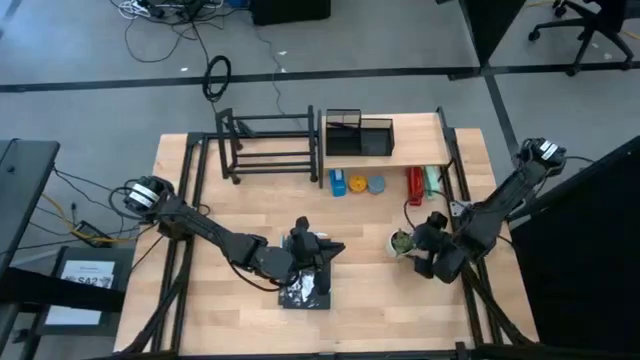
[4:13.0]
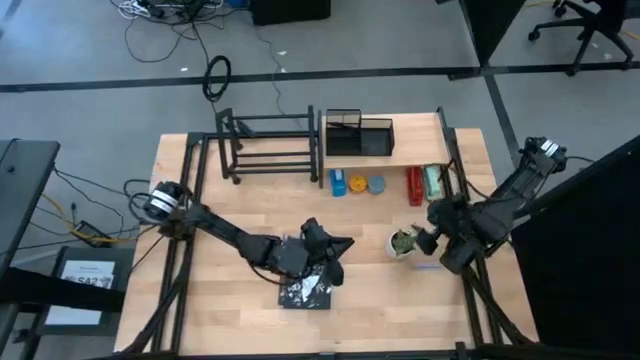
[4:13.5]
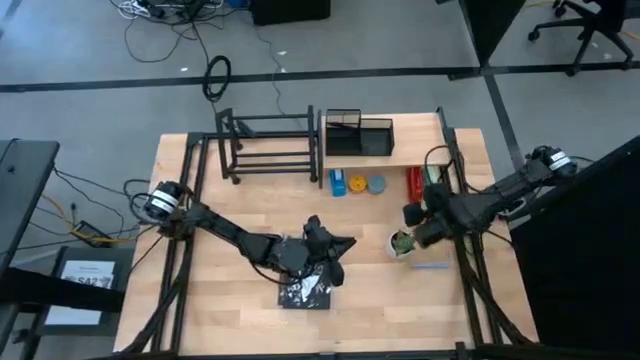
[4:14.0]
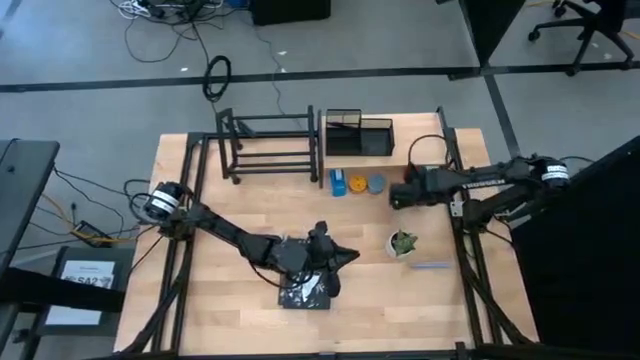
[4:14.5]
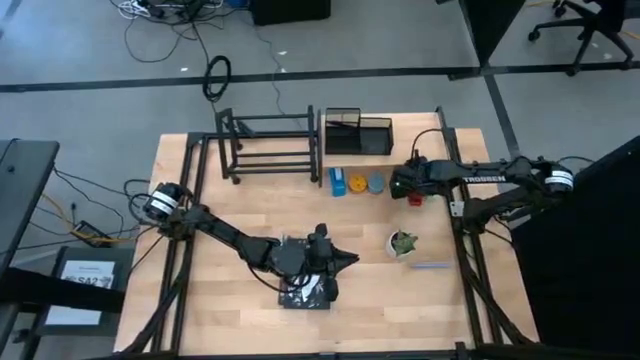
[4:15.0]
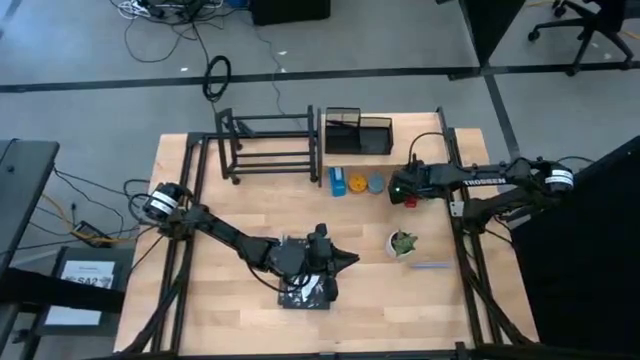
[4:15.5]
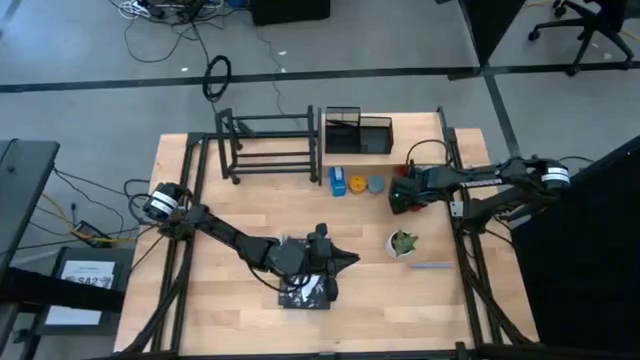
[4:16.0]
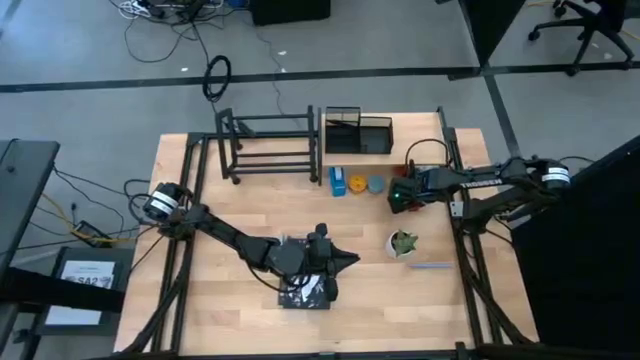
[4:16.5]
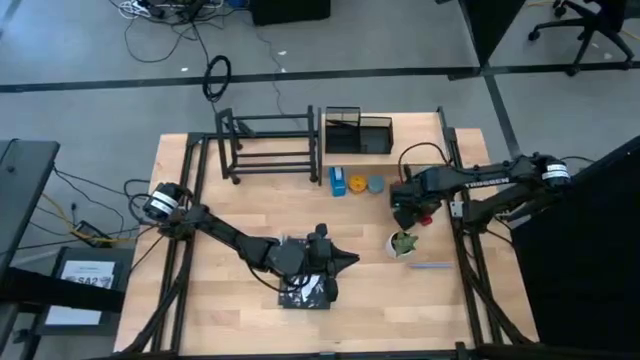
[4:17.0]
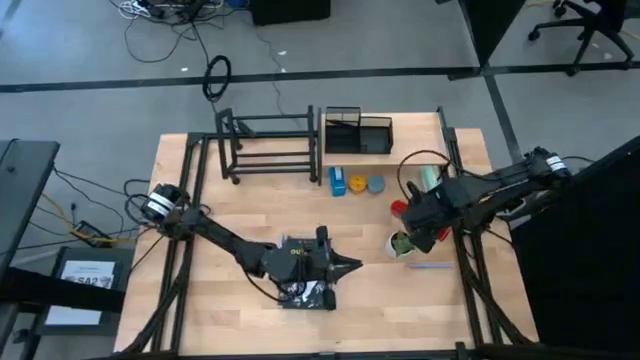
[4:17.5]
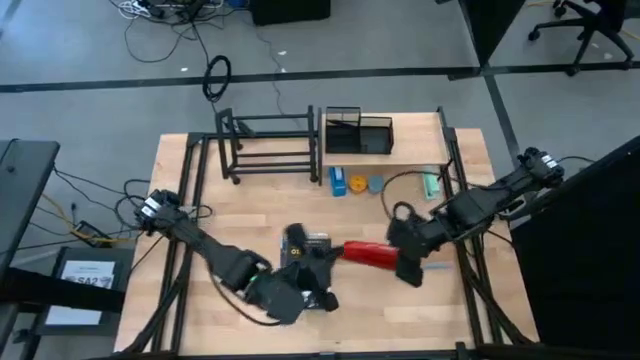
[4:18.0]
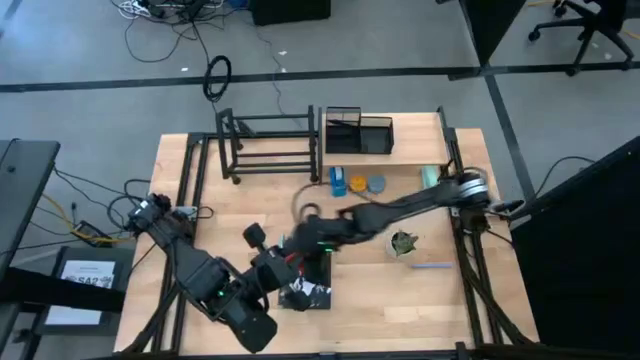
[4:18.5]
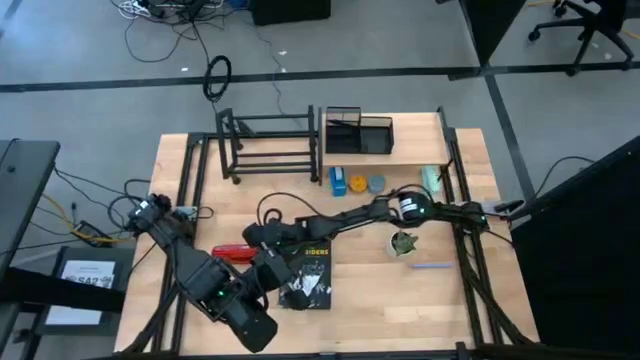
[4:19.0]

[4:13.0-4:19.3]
Task: Stock shelves
Remove red stapler from under the shelf

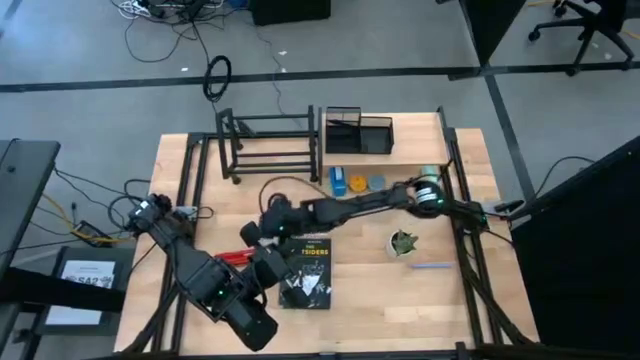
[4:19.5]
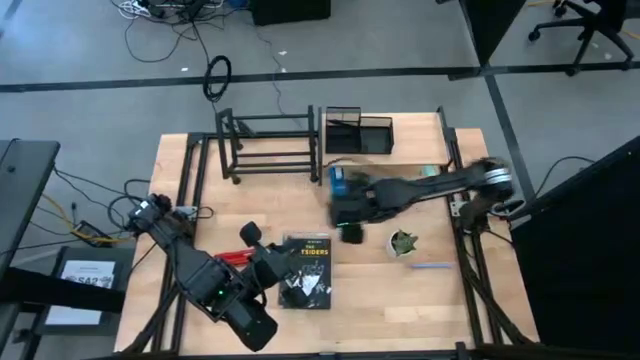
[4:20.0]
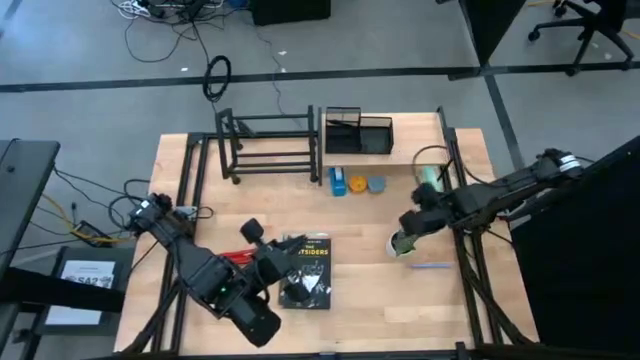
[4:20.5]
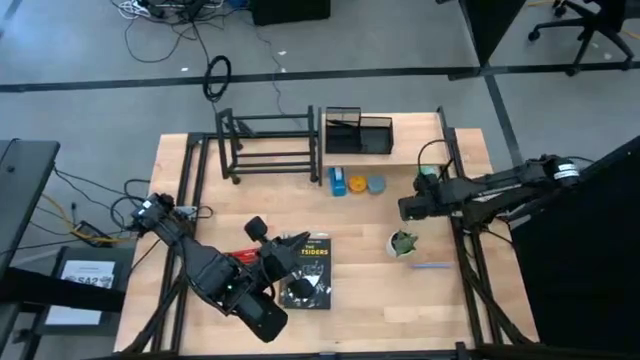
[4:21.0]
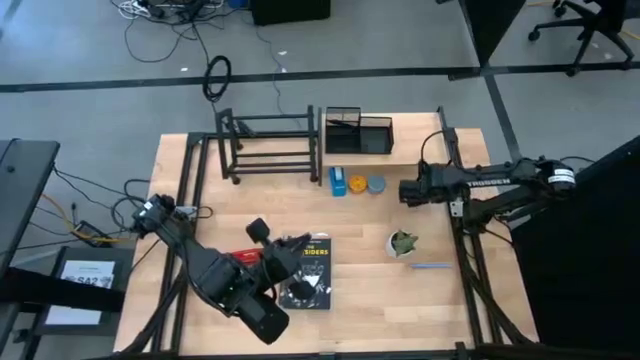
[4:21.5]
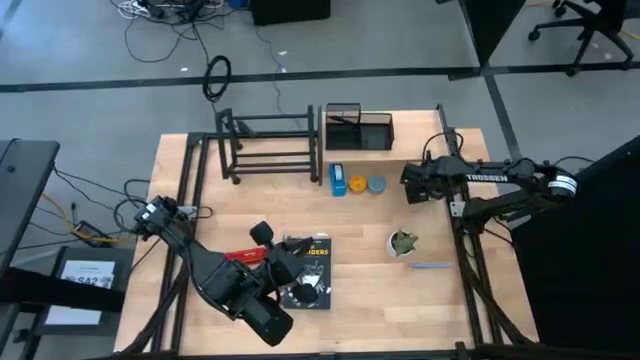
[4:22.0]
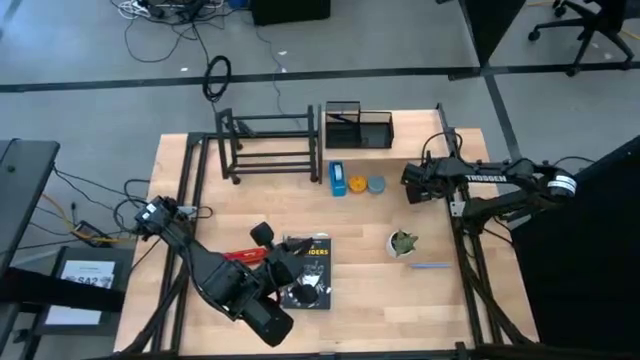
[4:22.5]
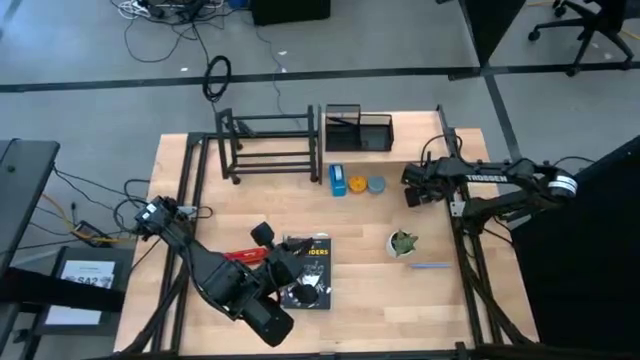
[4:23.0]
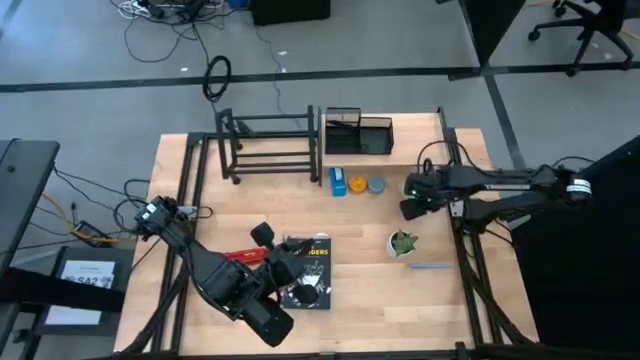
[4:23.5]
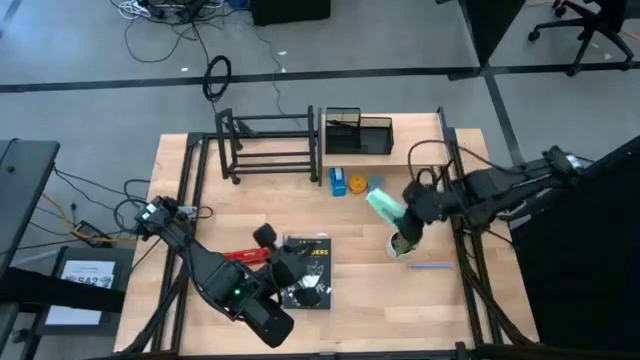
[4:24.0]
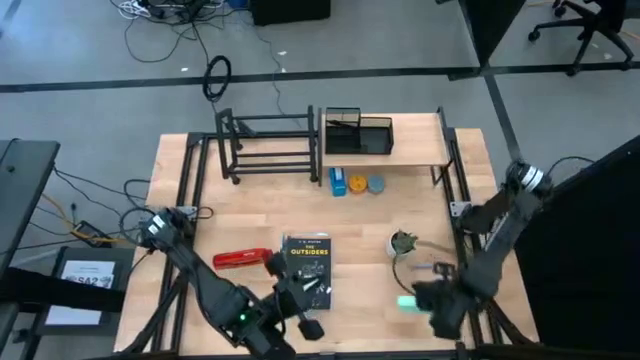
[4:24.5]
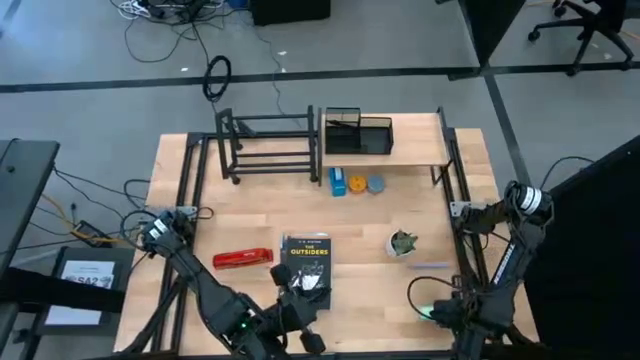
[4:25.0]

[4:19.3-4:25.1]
Remove green stapler from under the shelf

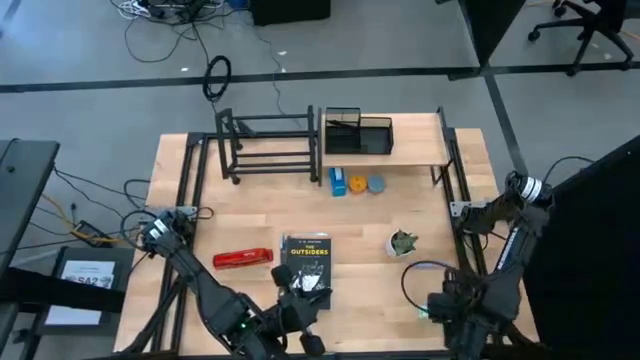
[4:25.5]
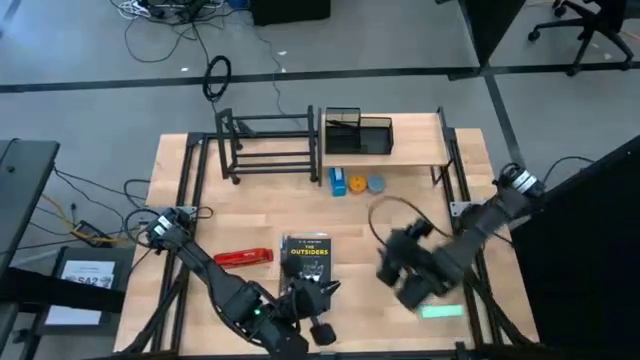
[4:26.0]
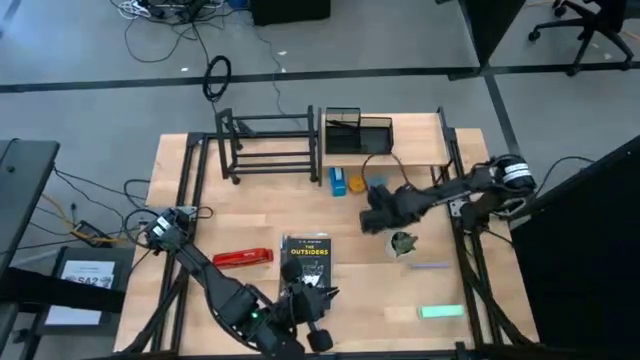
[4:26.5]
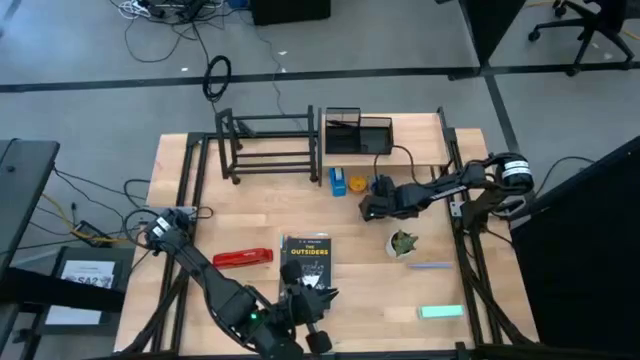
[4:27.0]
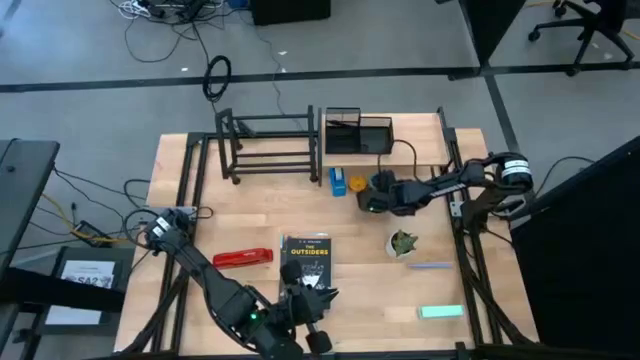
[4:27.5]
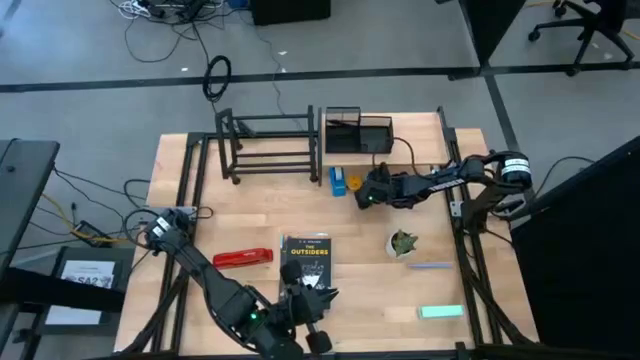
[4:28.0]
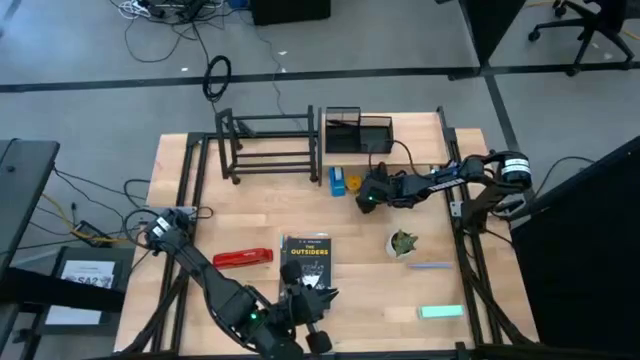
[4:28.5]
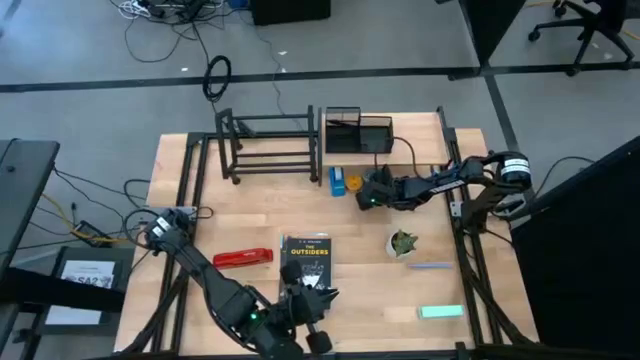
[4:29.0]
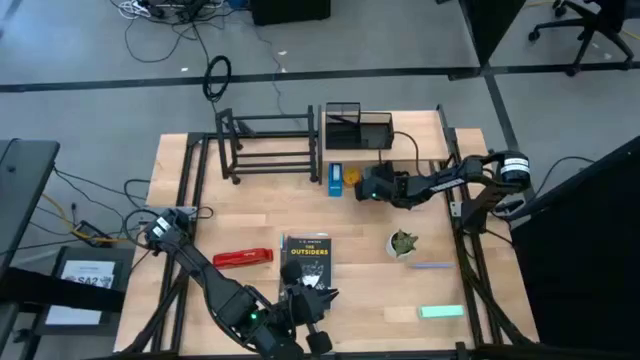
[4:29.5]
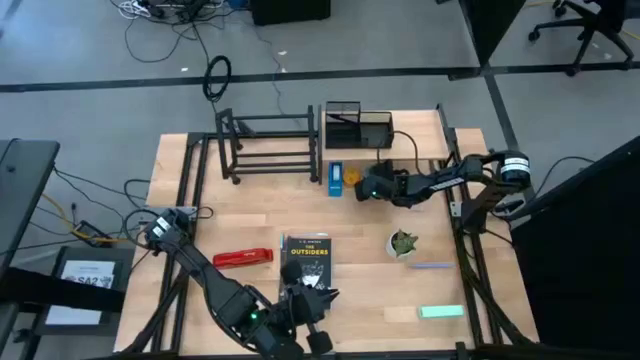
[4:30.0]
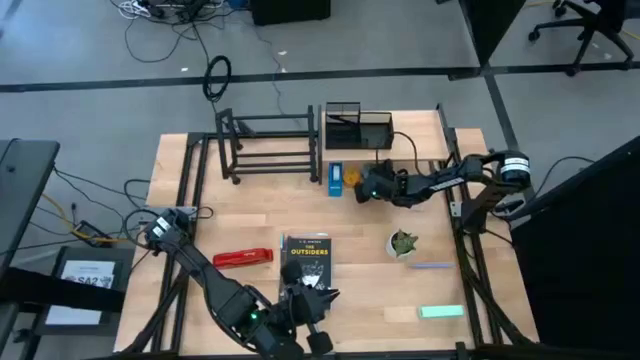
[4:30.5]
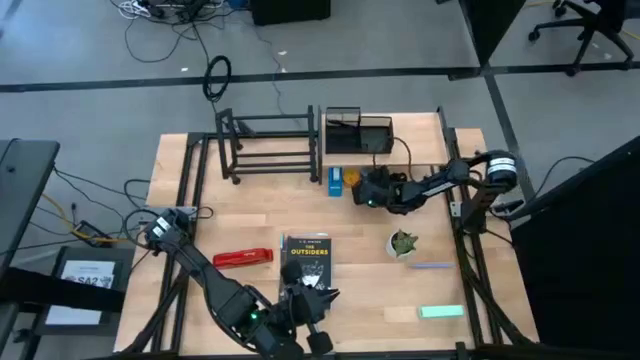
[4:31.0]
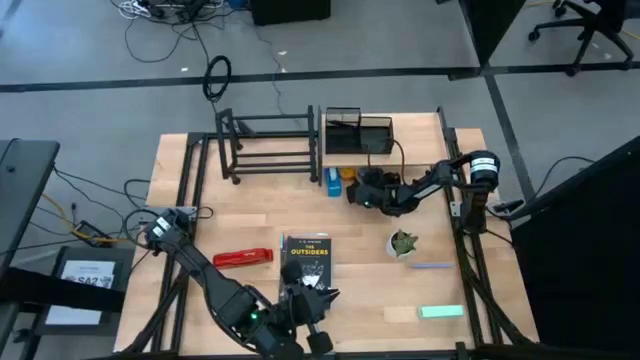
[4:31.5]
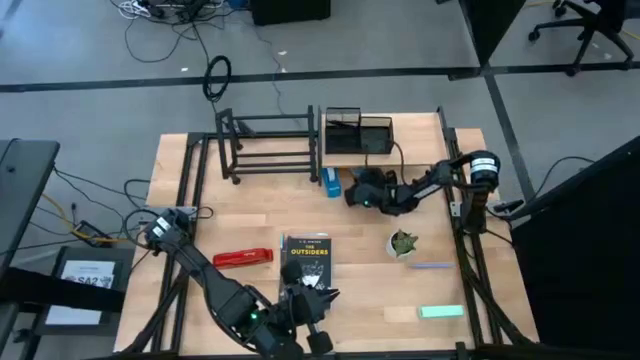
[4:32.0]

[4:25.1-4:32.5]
Remove the blue scented candle from under the shelf

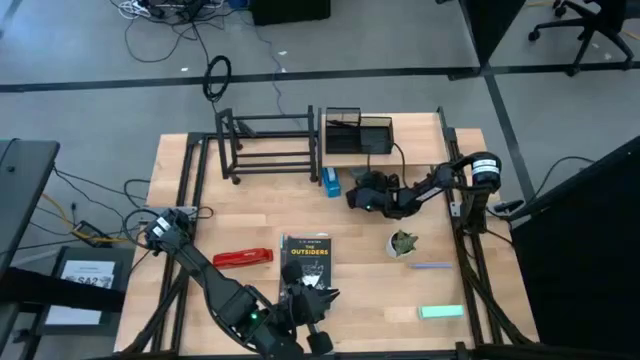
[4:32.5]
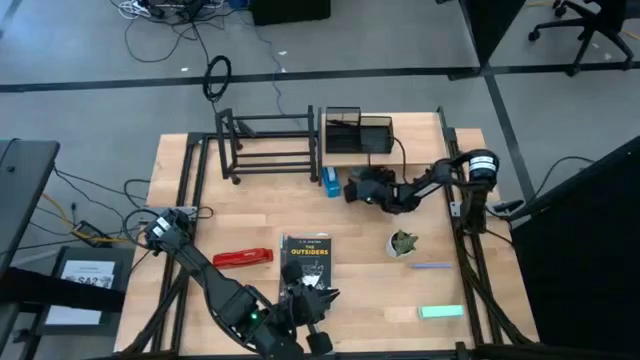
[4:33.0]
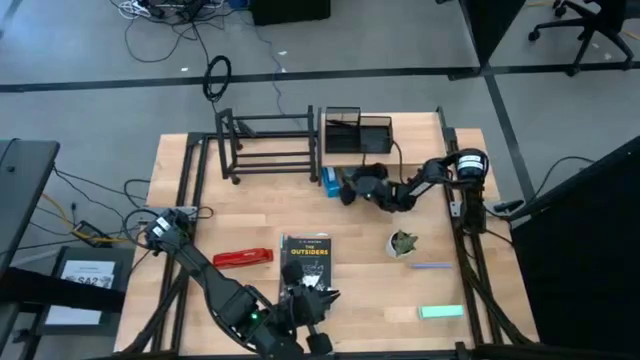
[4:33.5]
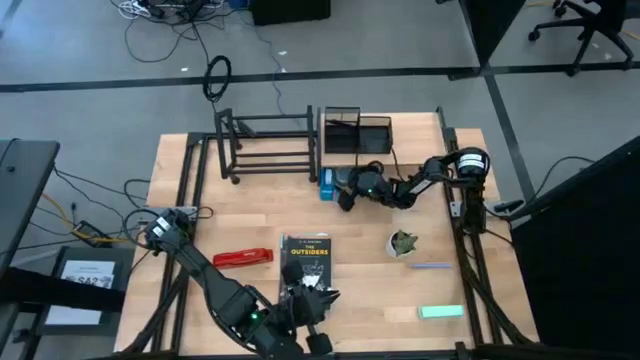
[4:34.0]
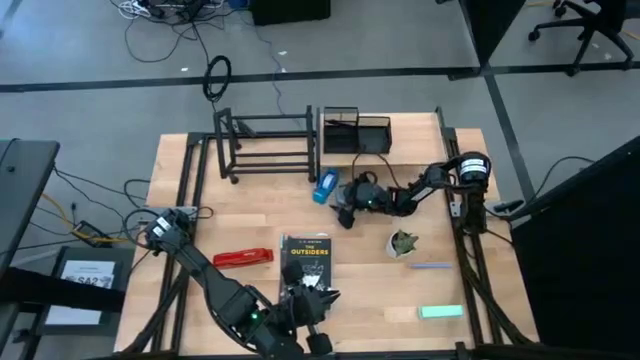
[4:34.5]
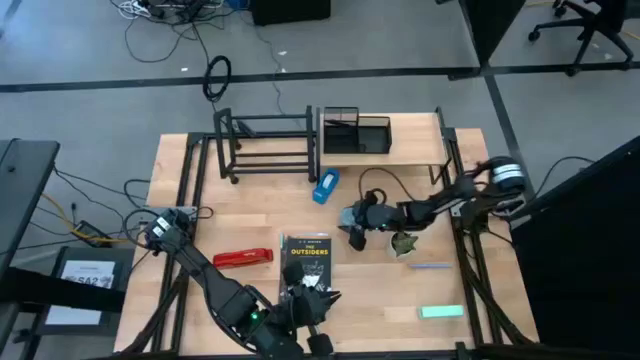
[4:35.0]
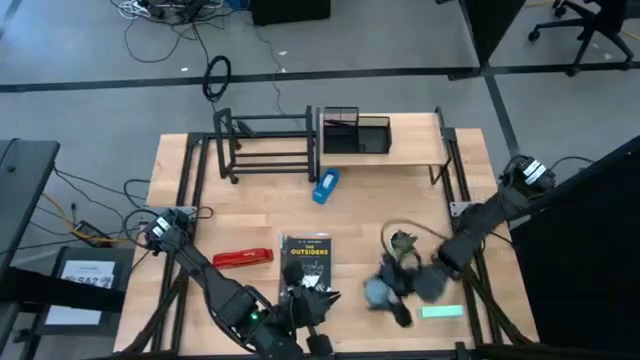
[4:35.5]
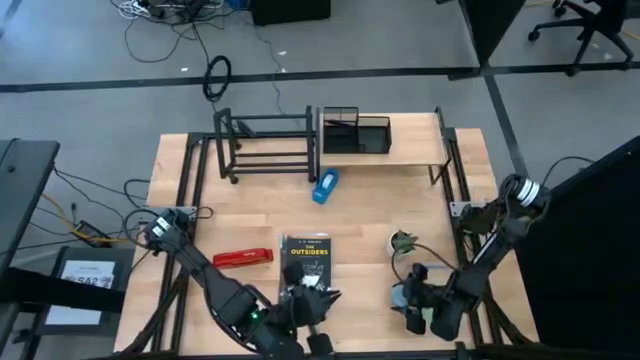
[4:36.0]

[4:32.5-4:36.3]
Remove the blue scented candle from under the shelf
